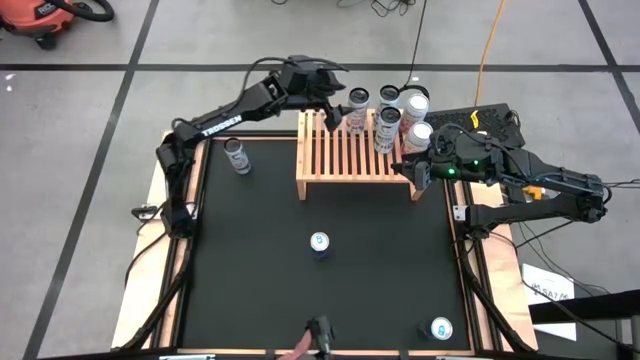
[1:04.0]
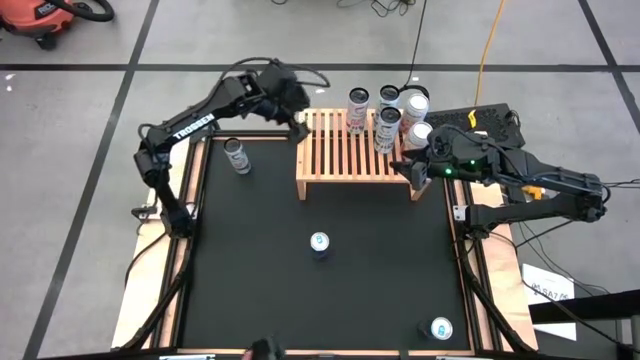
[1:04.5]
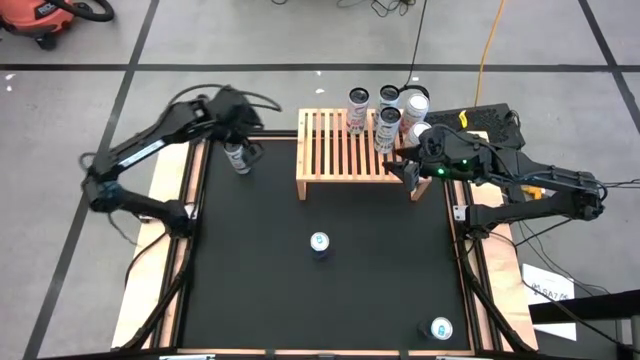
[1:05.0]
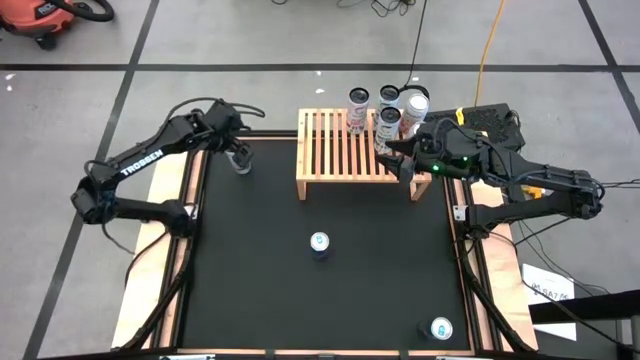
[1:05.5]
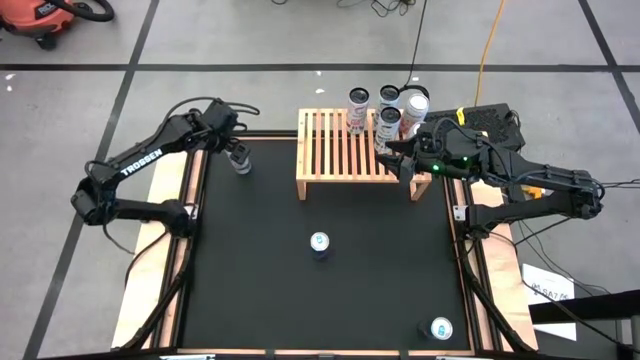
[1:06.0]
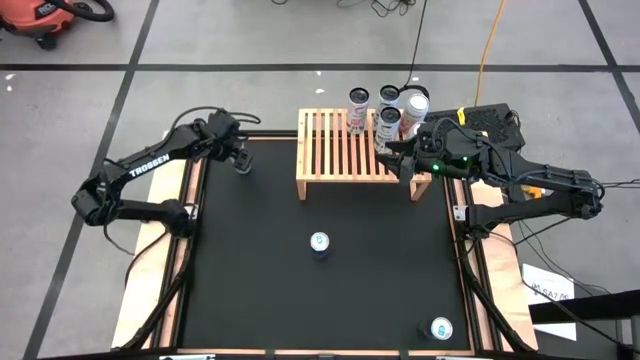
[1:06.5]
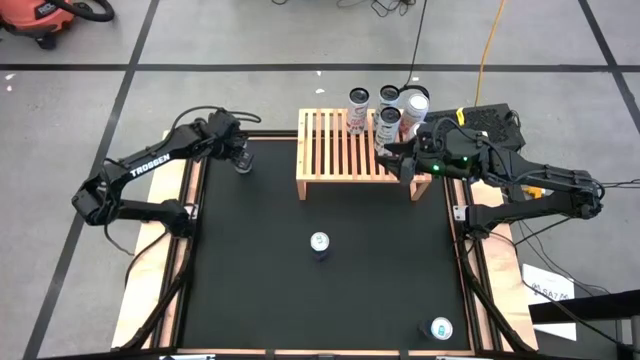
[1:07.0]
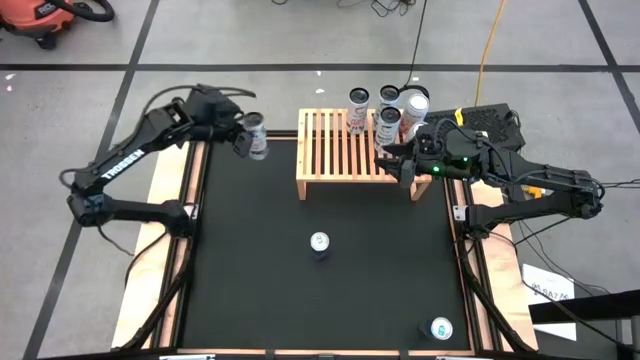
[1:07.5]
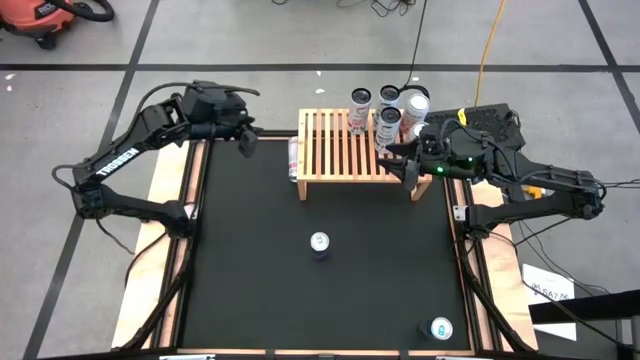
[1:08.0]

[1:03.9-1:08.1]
Task: Place canned beverage on shelf
Put the white soda can on the shelf

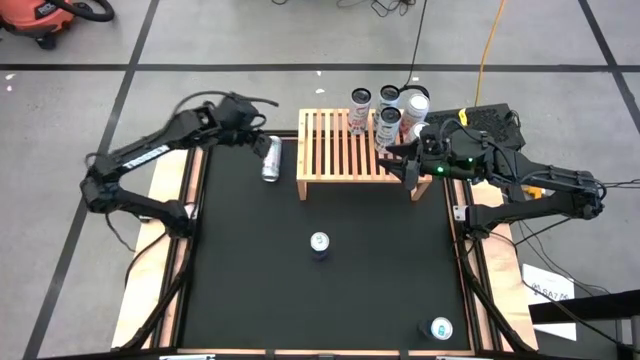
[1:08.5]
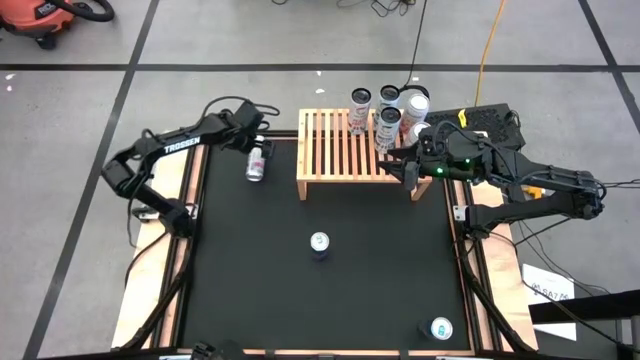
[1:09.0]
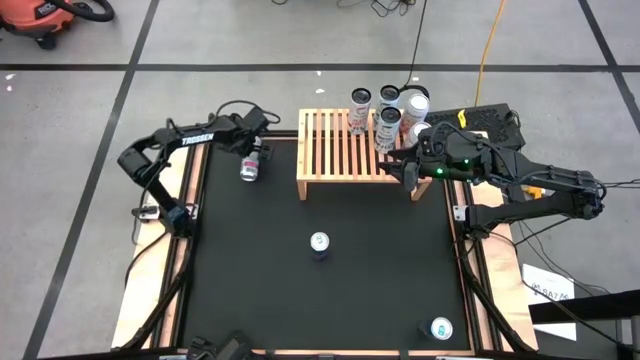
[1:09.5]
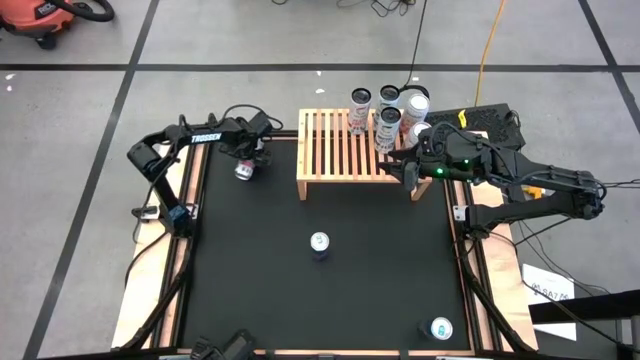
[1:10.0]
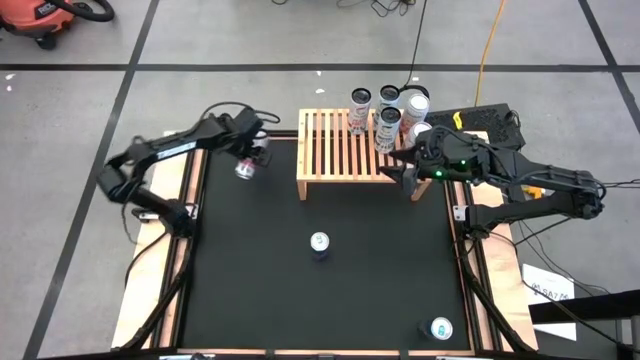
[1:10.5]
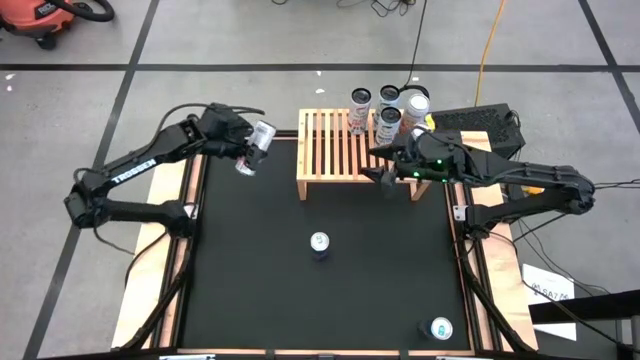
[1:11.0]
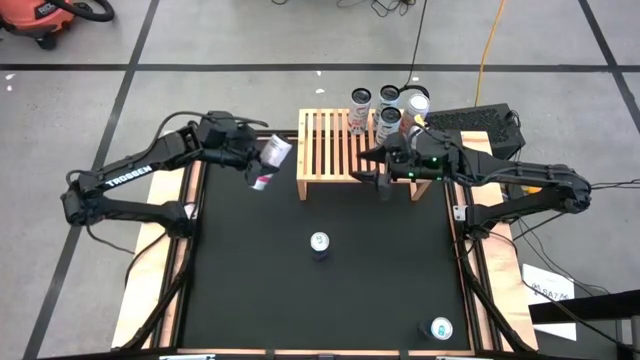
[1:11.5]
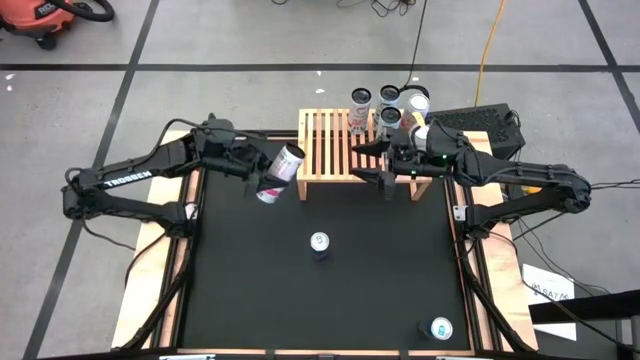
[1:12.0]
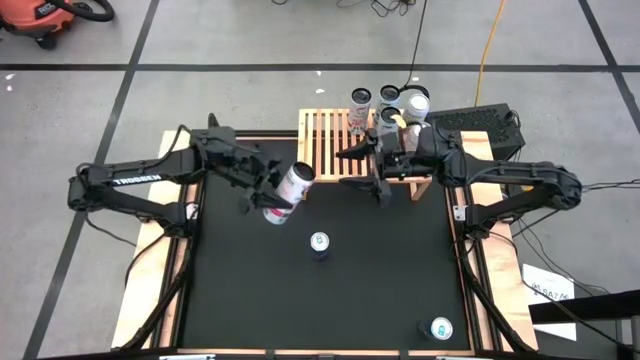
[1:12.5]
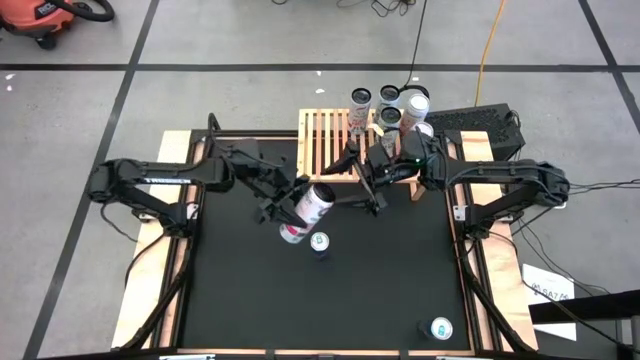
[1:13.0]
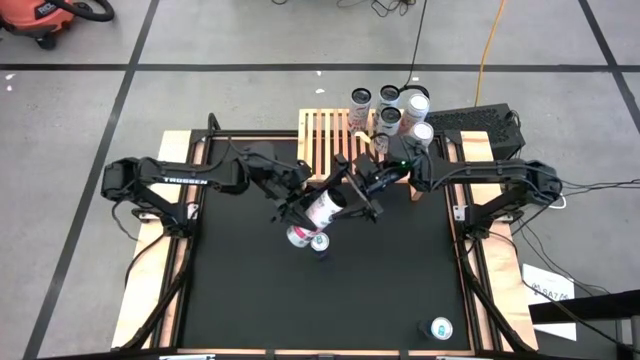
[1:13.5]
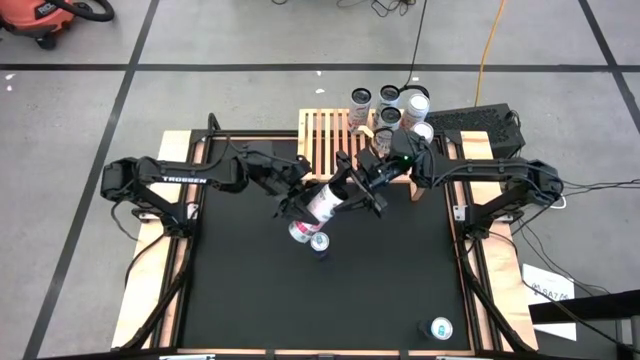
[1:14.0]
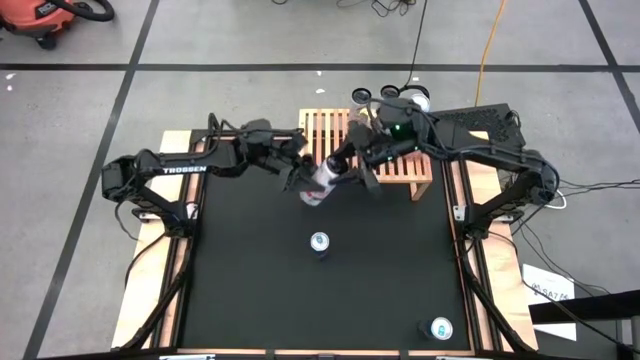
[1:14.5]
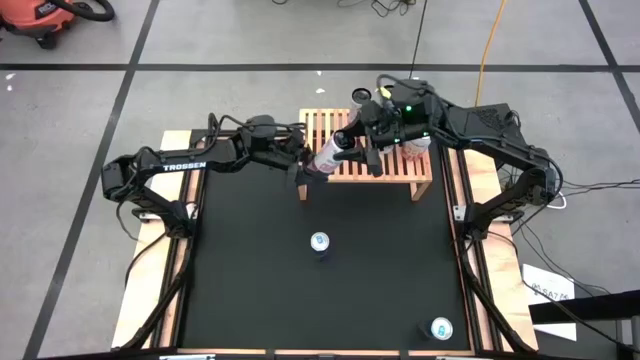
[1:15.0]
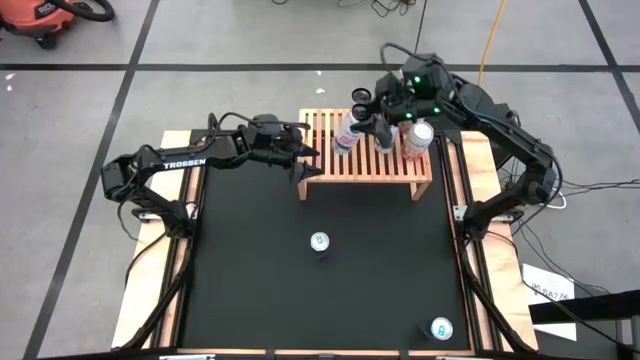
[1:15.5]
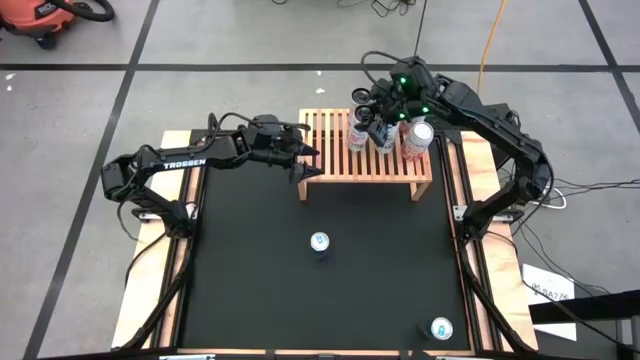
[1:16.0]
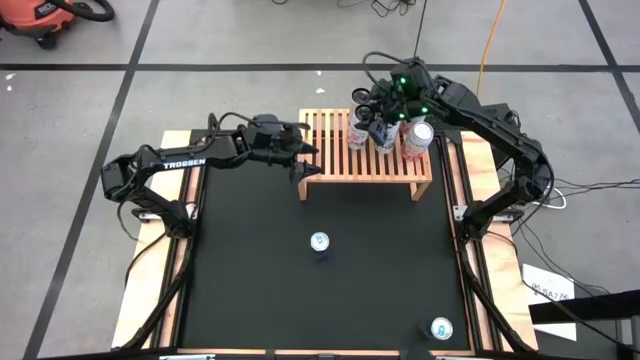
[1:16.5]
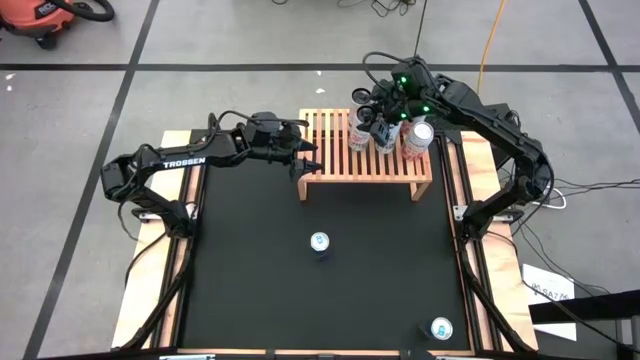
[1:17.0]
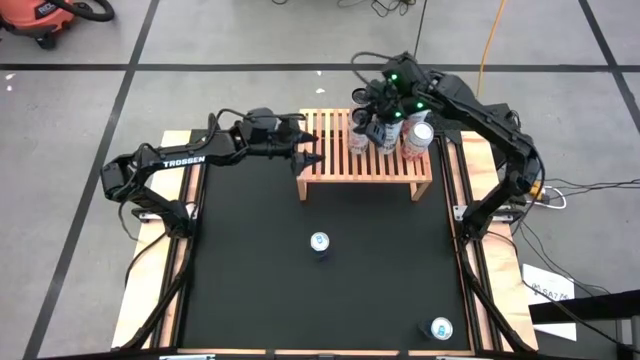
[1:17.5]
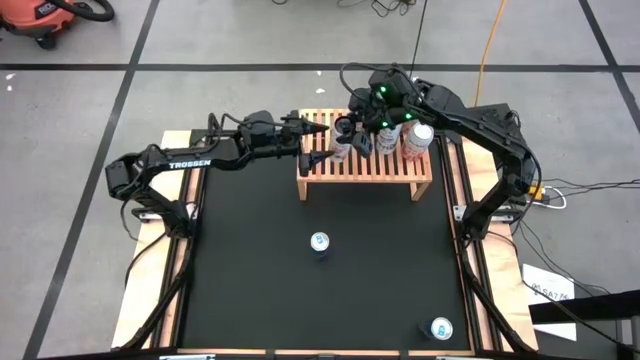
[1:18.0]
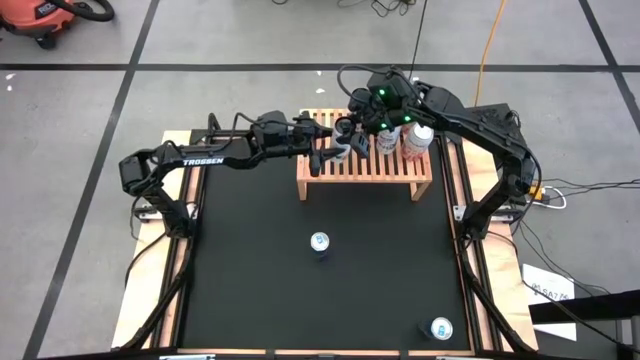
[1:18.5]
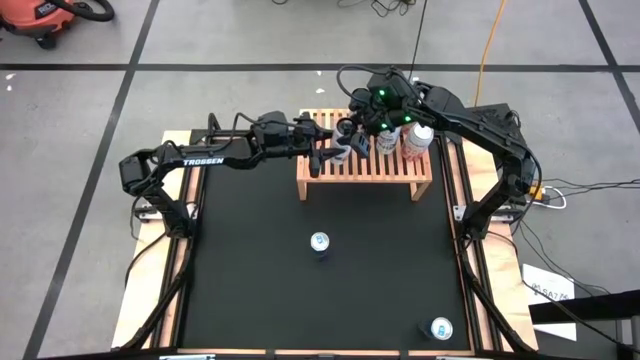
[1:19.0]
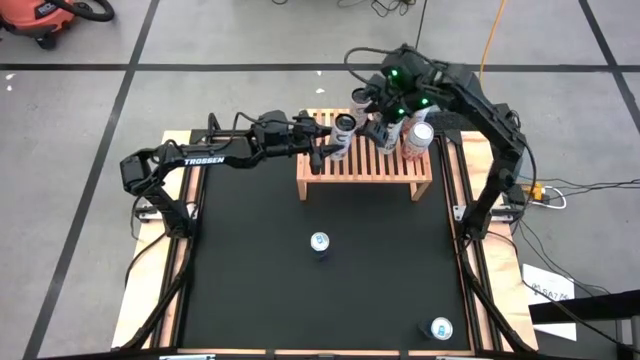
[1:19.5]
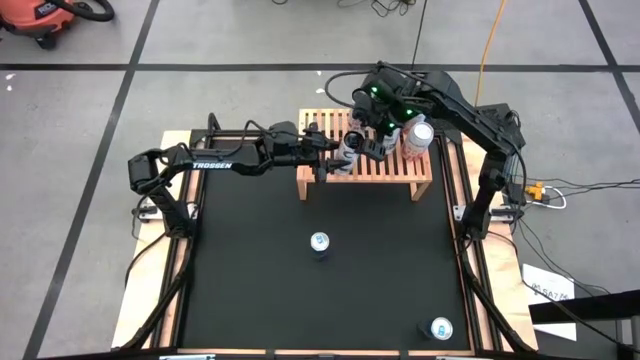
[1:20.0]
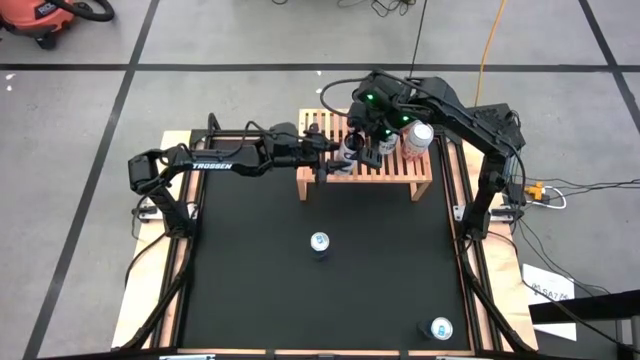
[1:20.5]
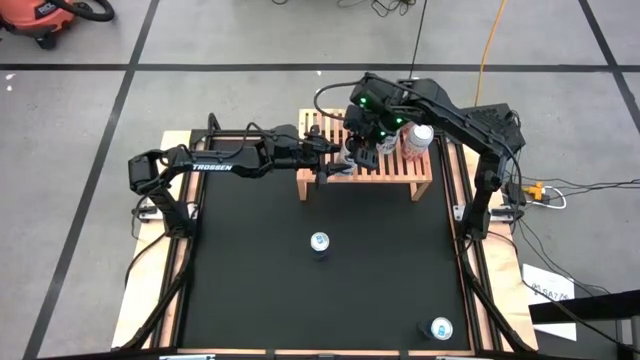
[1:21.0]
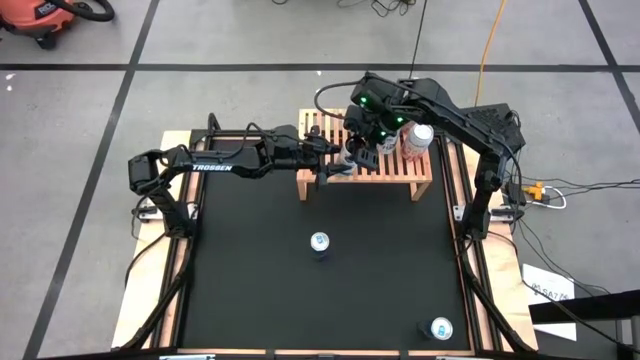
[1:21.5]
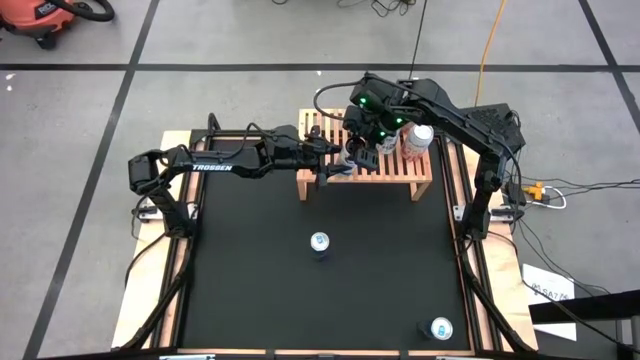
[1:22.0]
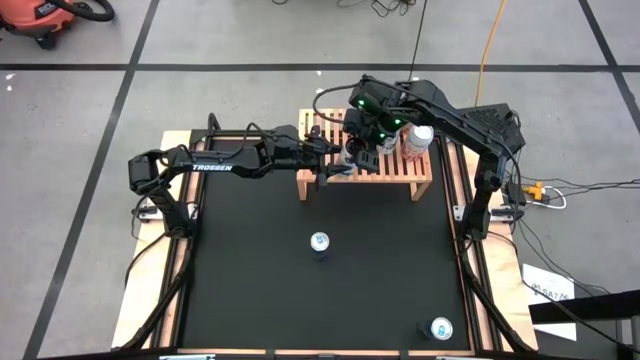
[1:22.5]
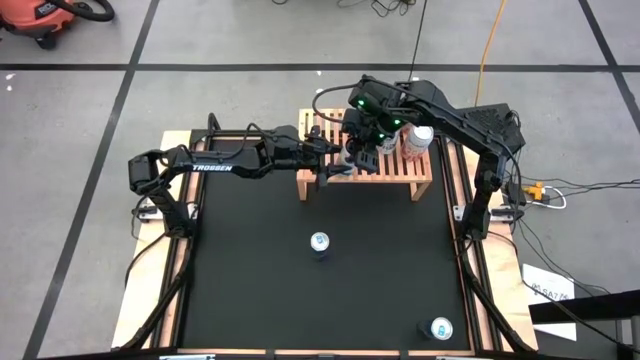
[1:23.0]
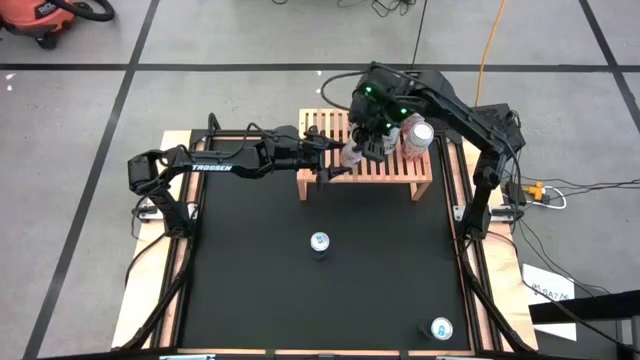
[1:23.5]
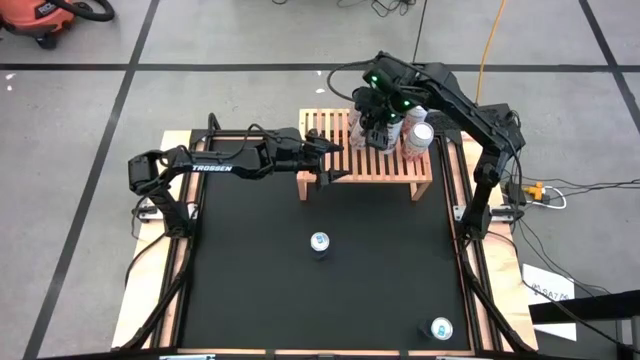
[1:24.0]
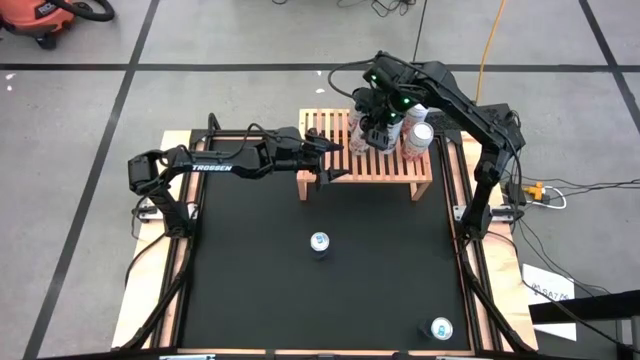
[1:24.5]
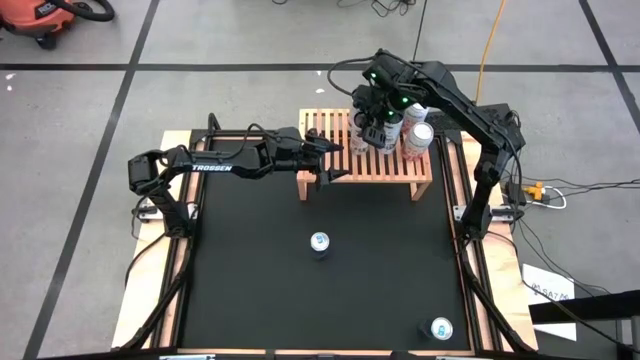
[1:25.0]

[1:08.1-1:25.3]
Put the white soda can on the shelf

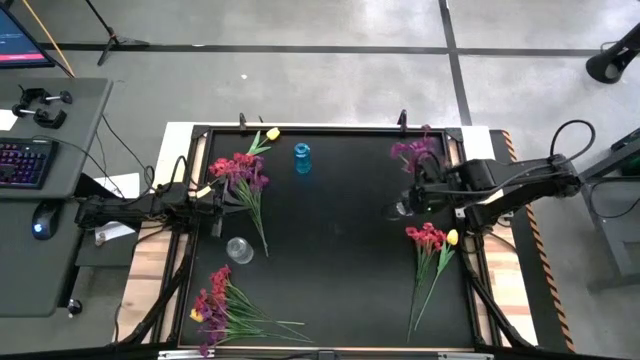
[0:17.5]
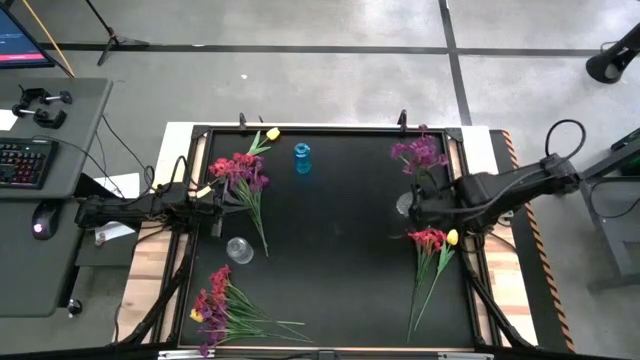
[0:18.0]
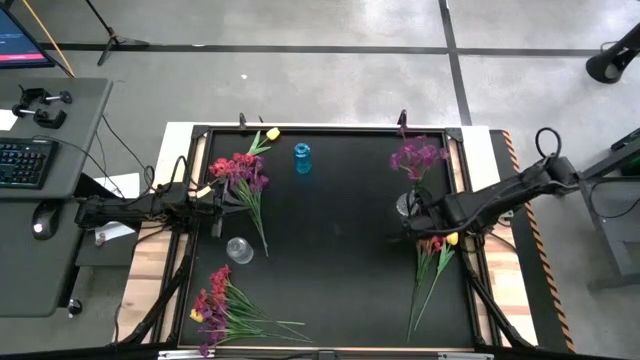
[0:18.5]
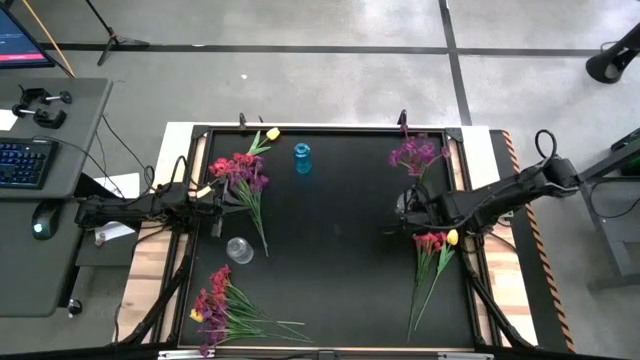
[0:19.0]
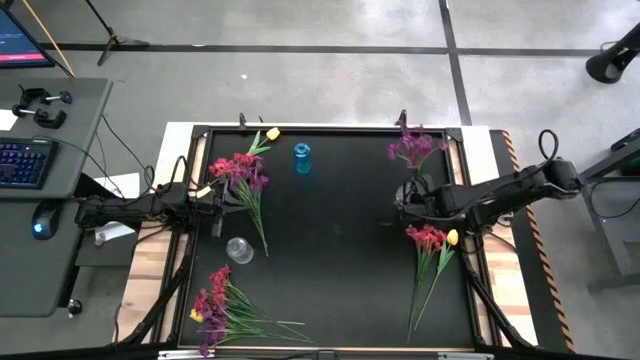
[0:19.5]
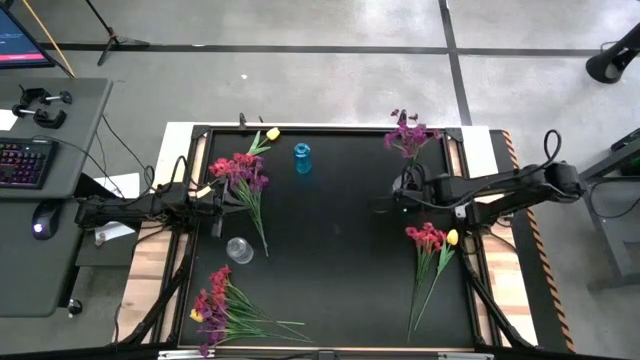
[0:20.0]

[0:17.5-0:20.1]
Task: Sort flowers into vase by color
Adjust the right transparent vase on the table
